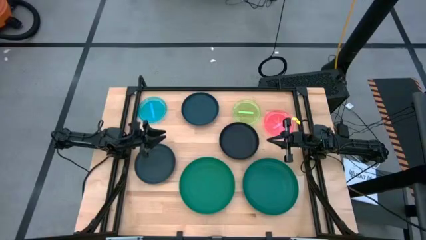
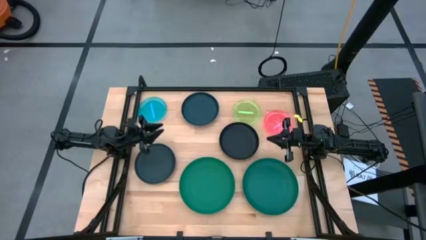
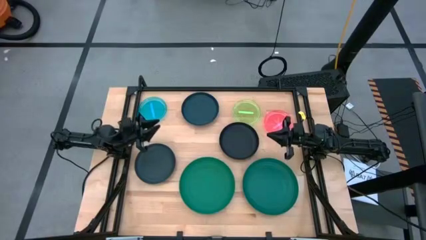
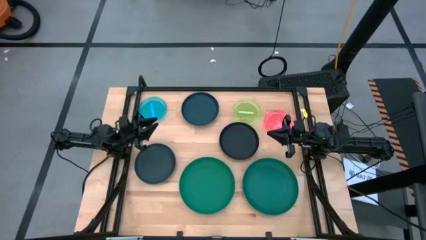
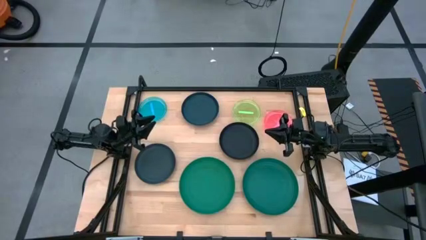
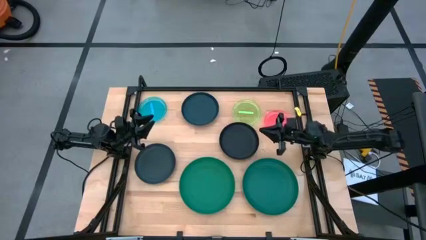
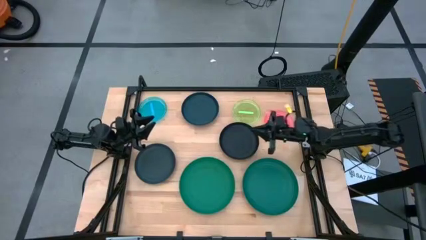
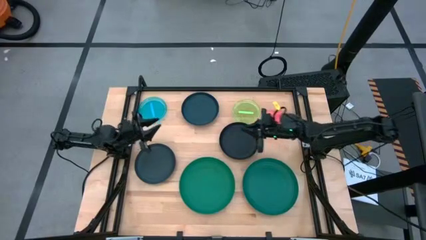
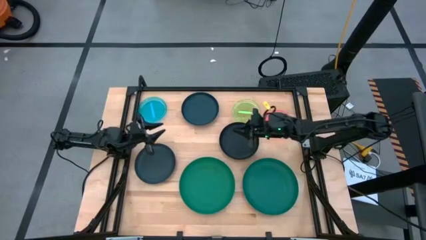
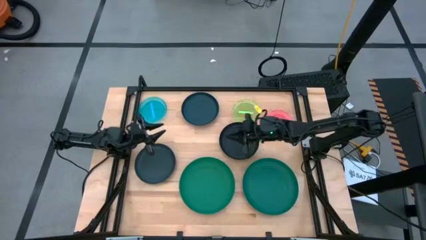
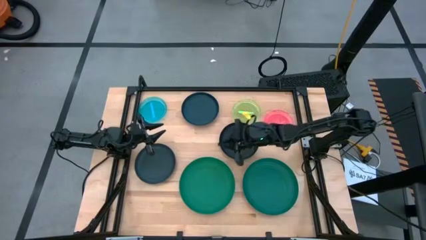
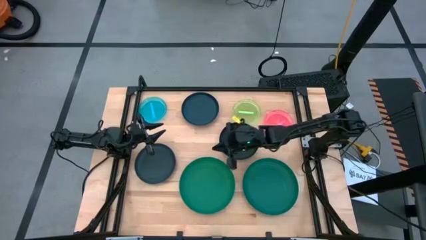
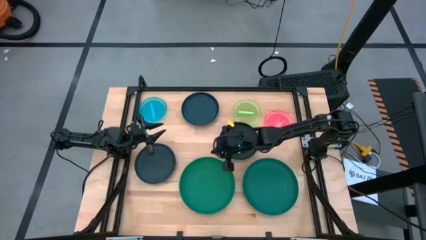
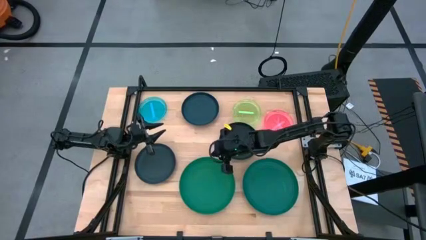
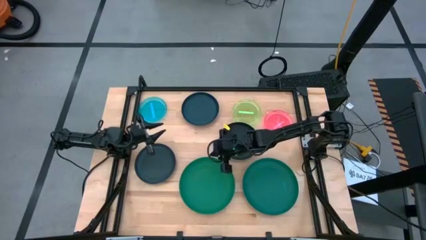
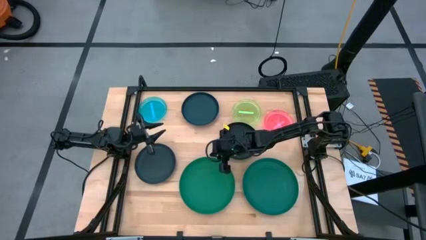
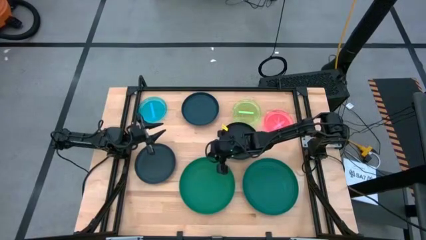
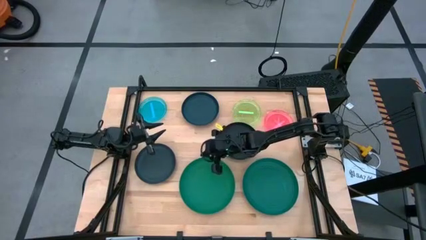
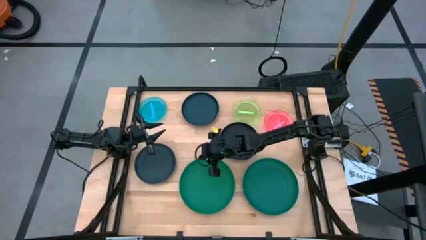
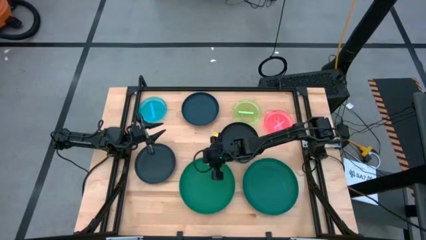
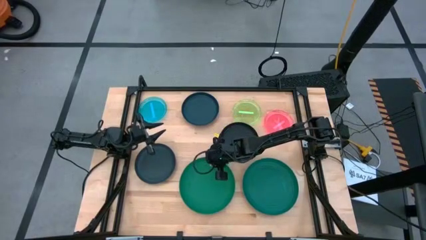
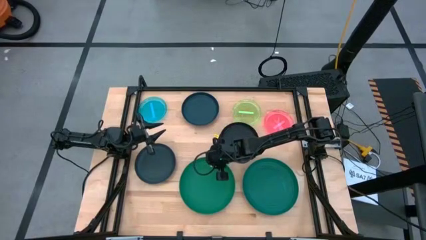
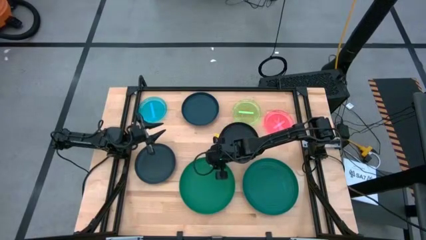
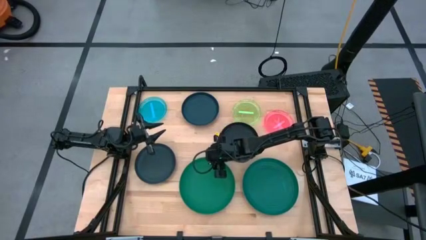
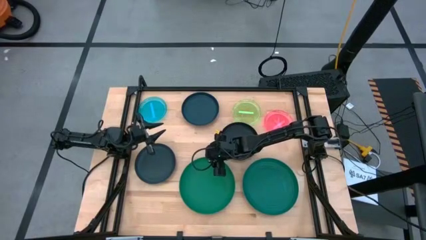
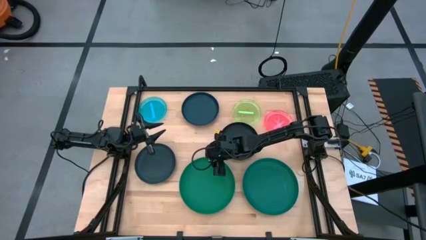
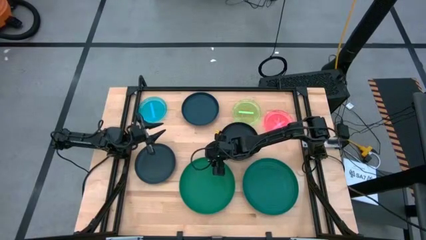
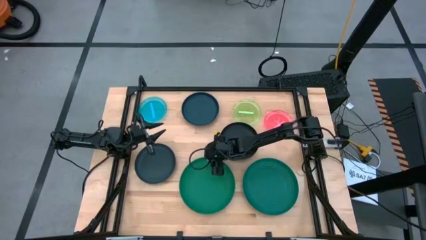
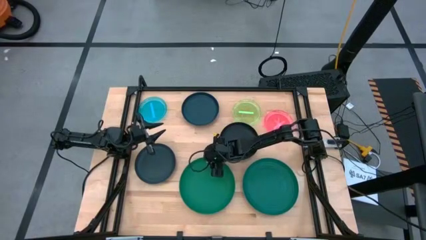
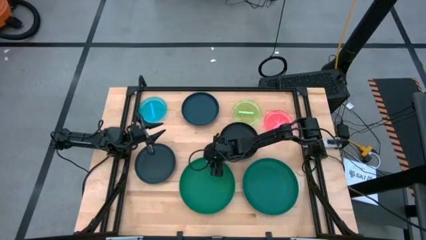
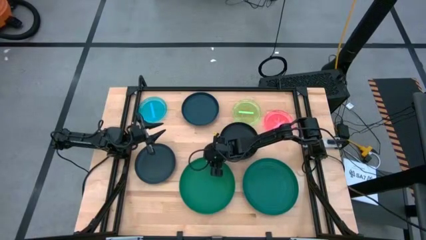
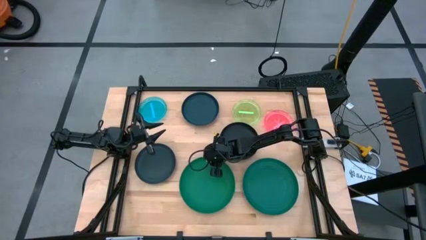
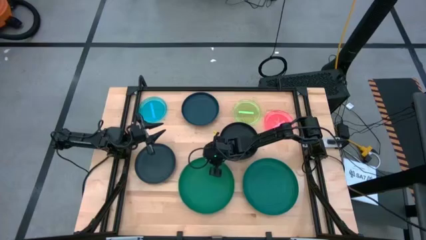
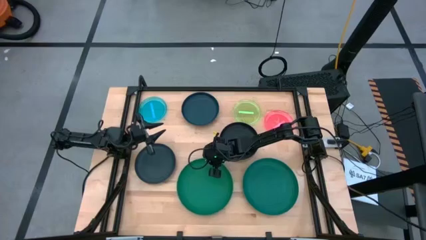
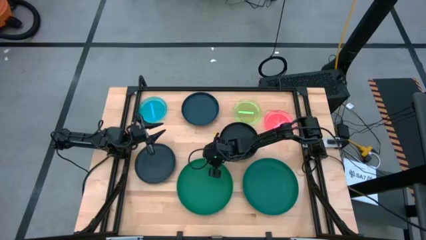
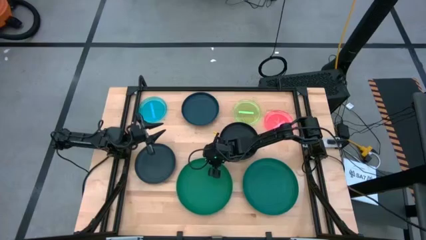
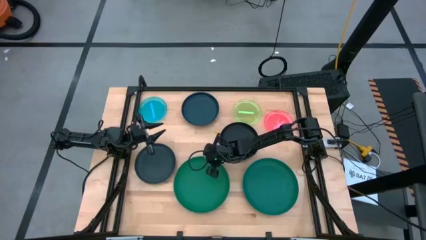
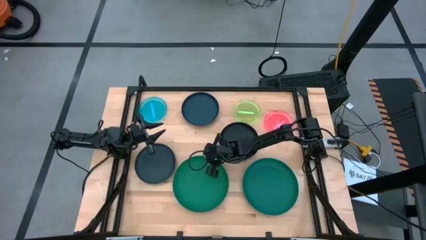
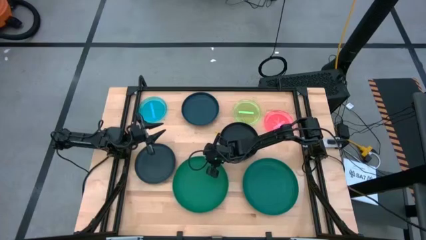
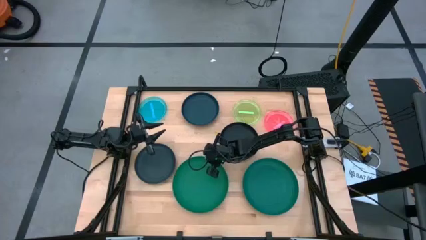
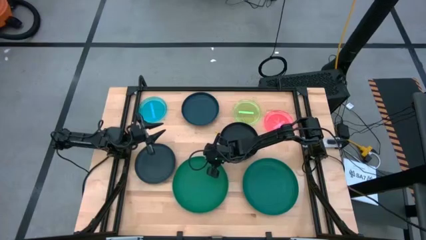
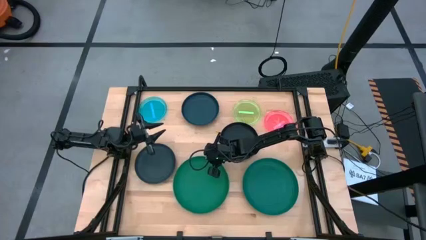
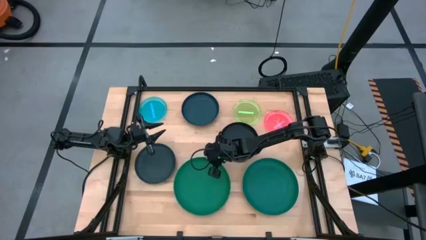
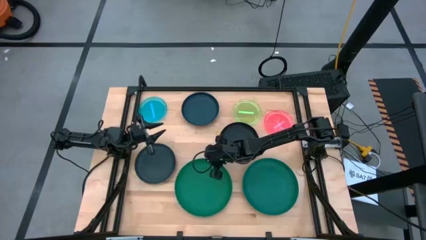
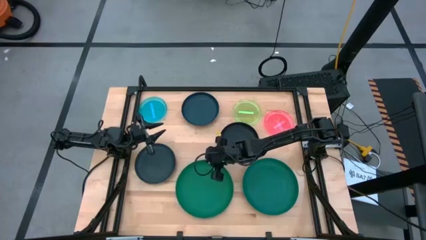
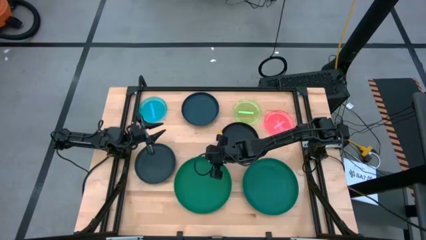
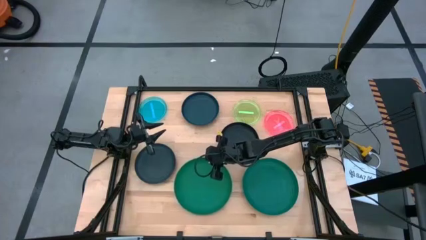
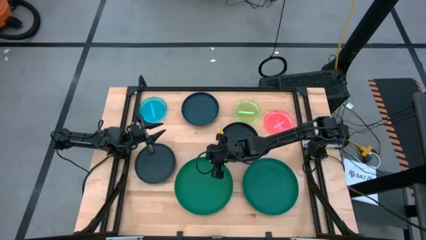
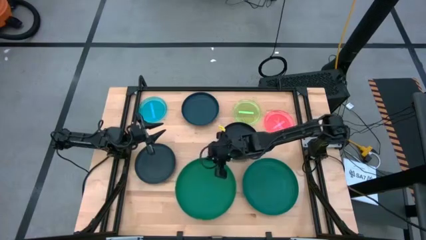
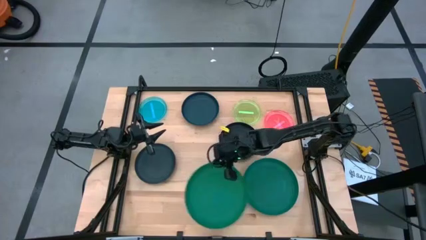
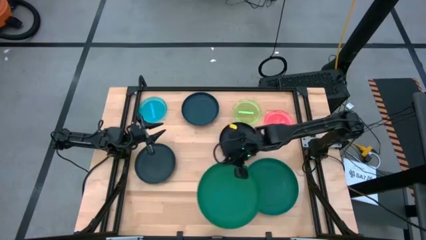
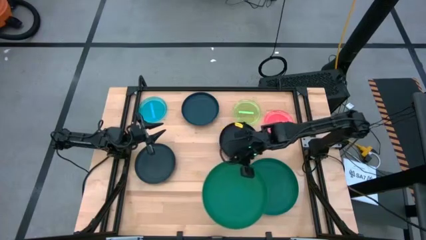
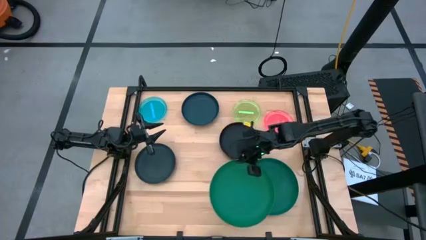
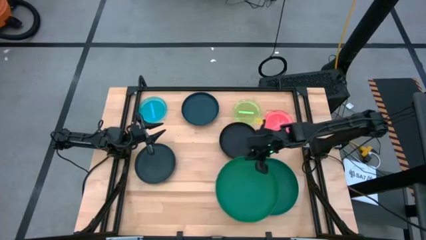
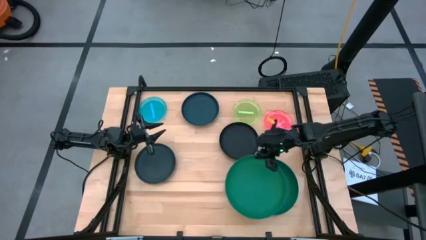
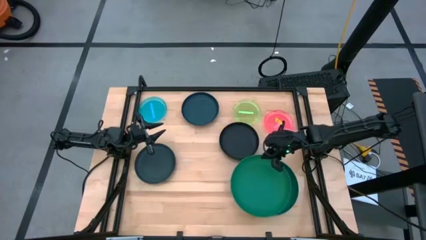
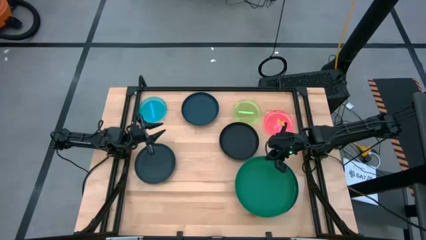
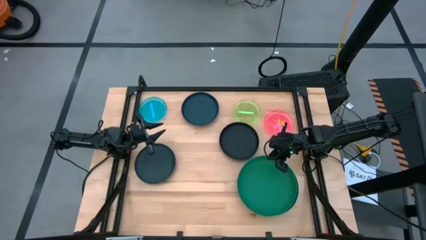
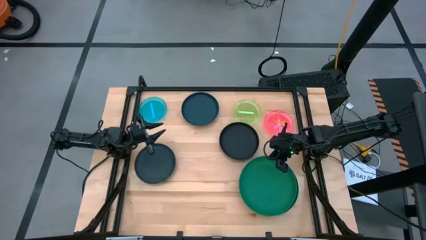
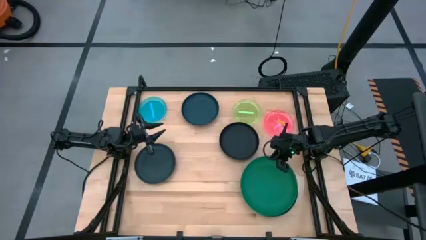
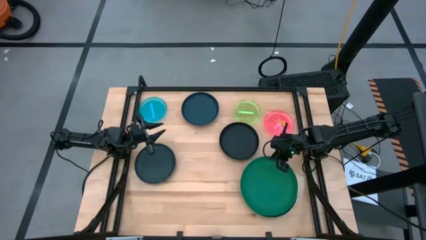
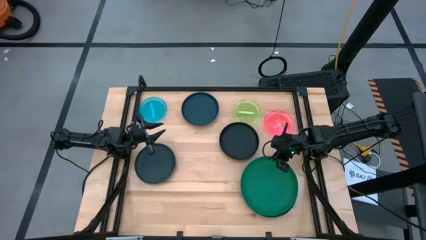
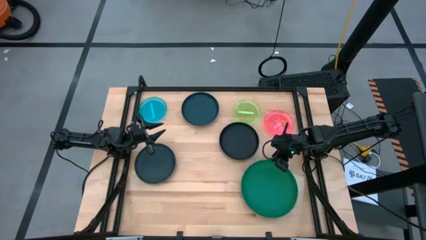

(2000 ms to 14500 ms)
Task: Stack plastic plates
Stack the green plate on top of the dark green plate

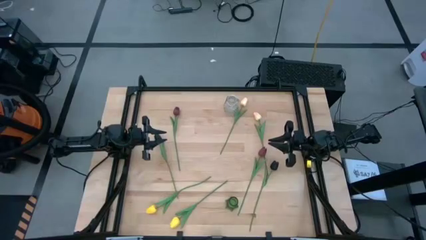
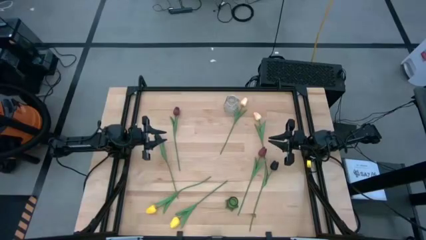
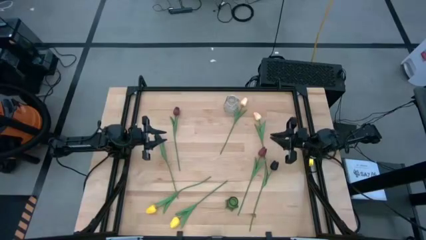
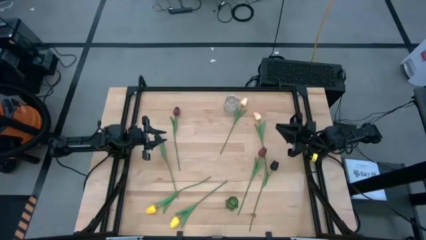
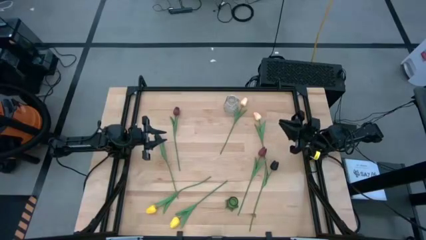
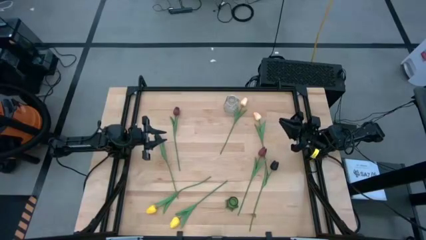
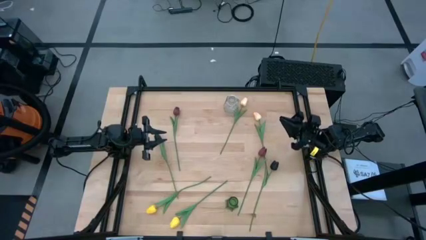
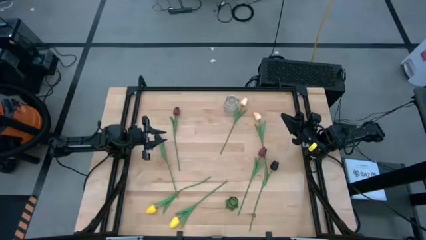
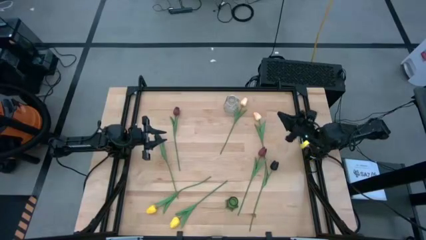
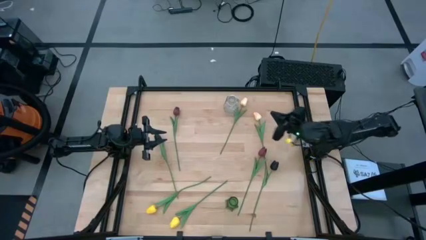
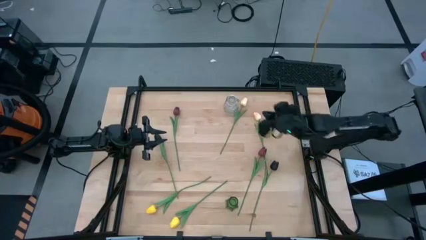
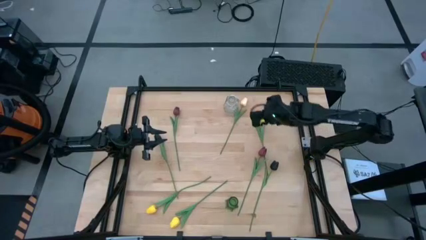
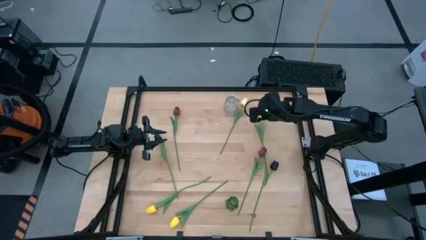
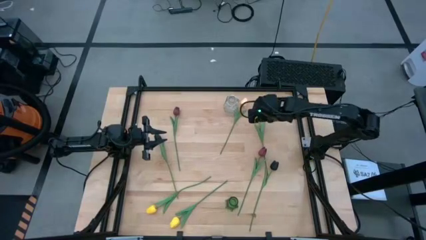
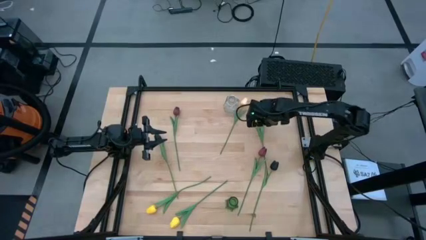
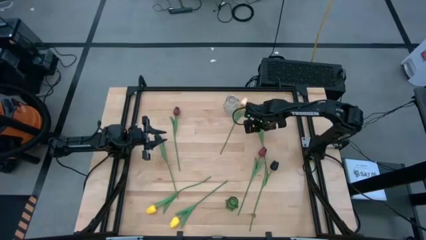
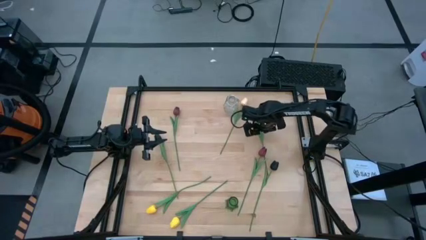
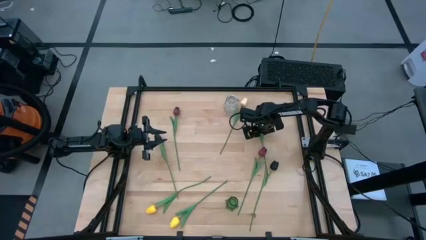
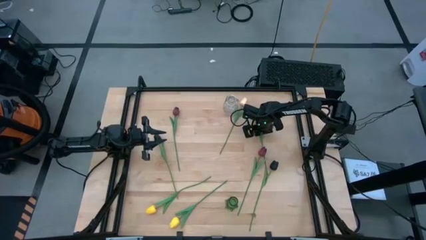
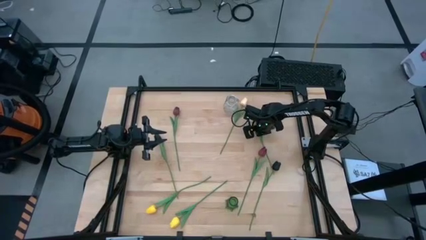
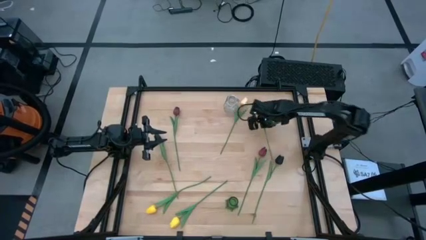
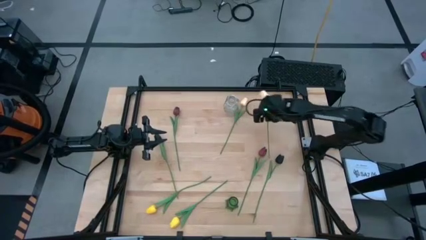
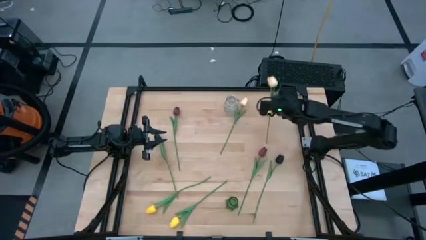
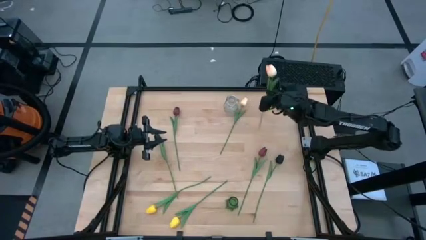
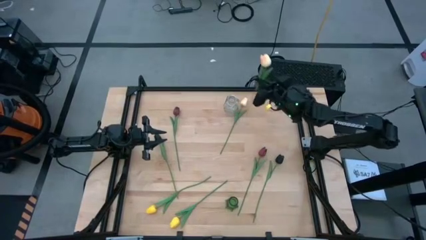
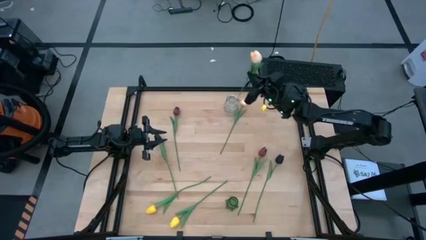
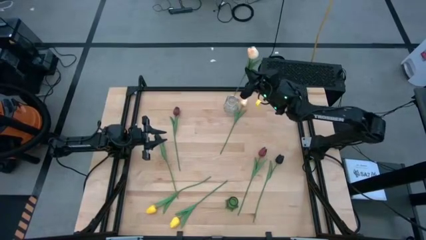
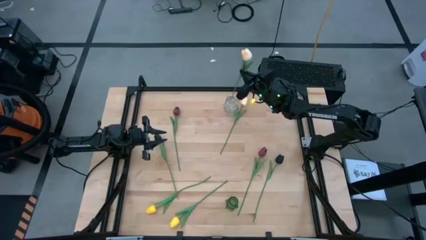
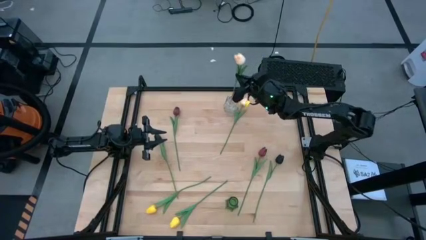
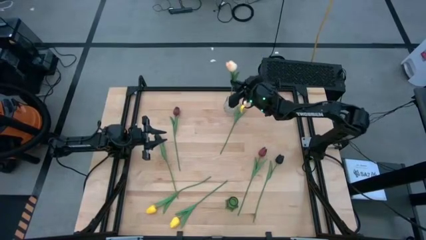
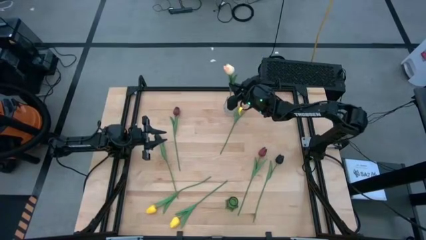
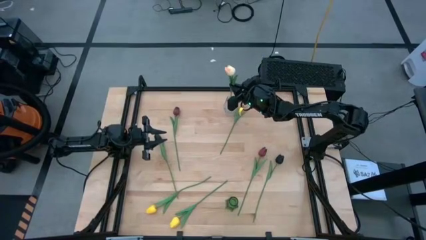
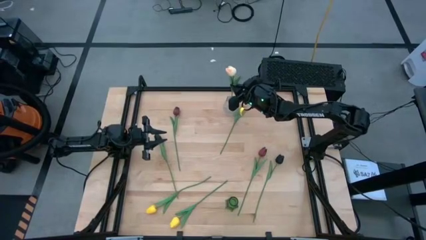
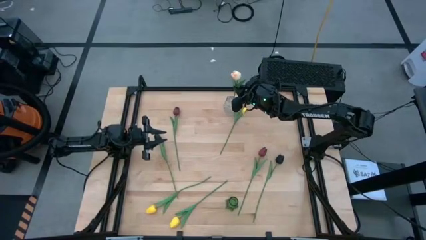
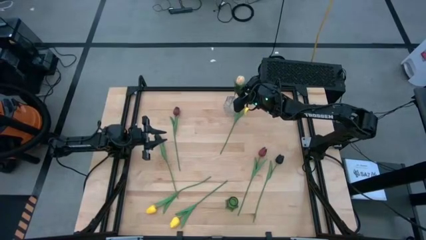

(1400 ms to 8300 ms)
Task: Sort flowers into vase by color
Put the right peach tulip into the transparent flower vase
